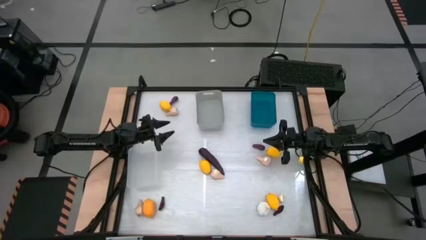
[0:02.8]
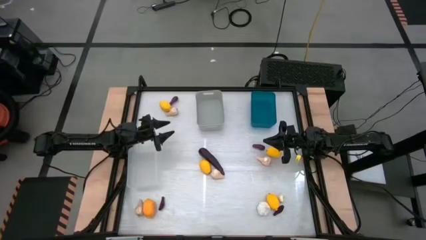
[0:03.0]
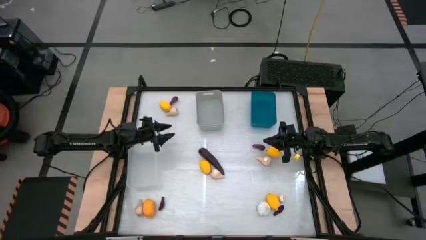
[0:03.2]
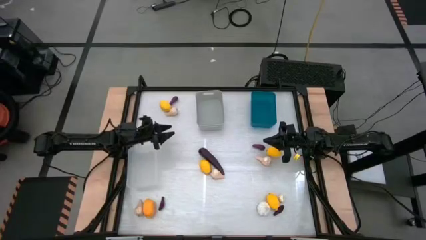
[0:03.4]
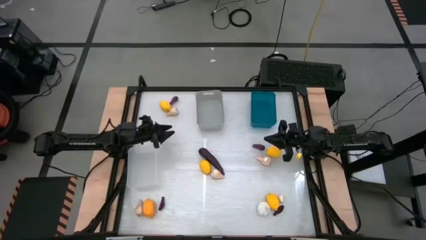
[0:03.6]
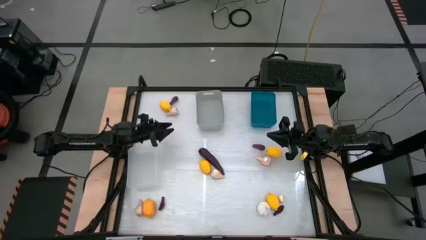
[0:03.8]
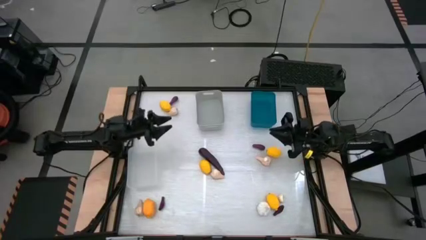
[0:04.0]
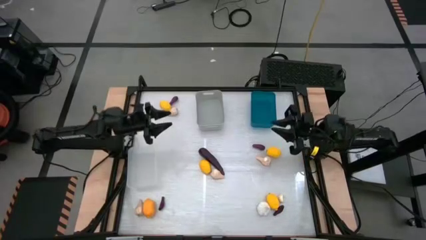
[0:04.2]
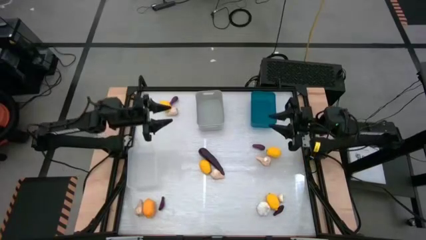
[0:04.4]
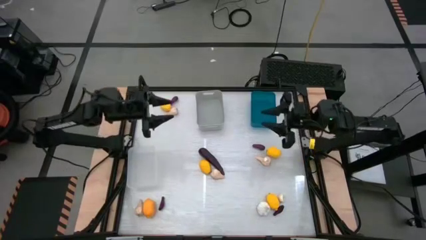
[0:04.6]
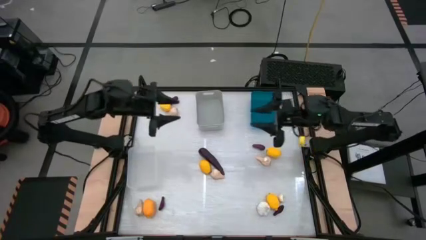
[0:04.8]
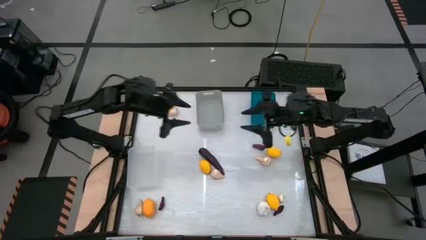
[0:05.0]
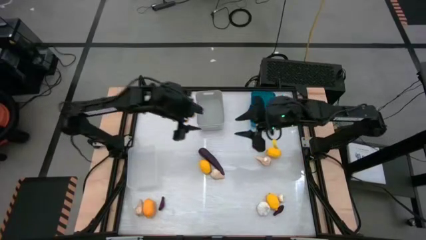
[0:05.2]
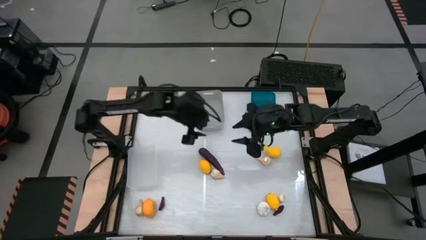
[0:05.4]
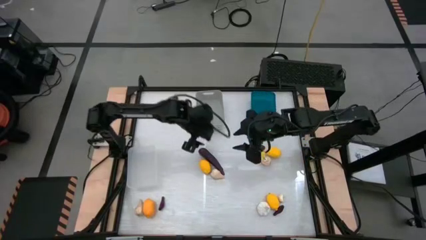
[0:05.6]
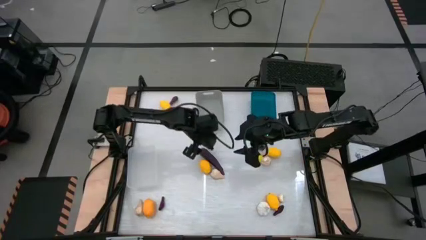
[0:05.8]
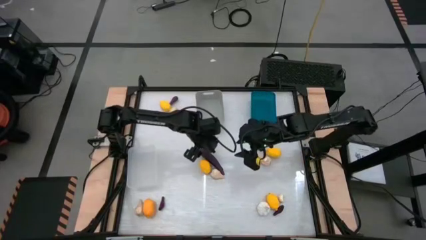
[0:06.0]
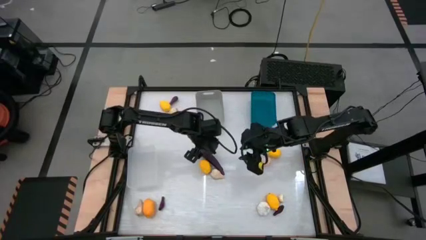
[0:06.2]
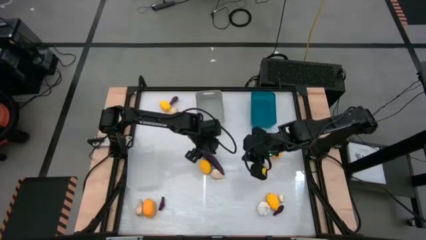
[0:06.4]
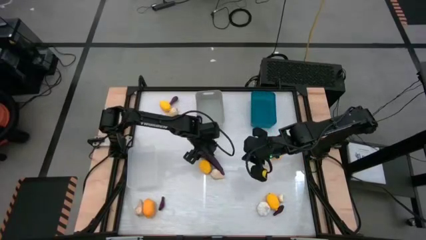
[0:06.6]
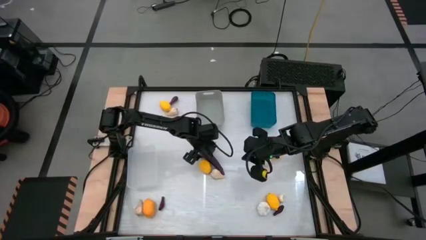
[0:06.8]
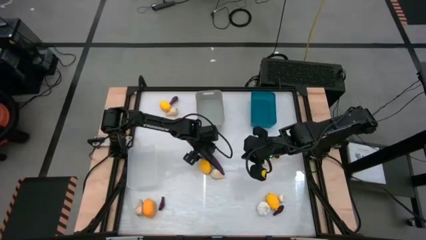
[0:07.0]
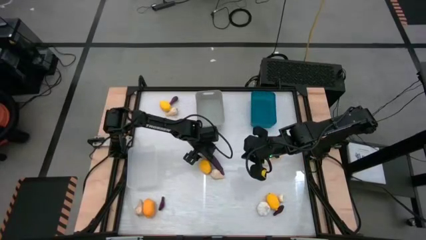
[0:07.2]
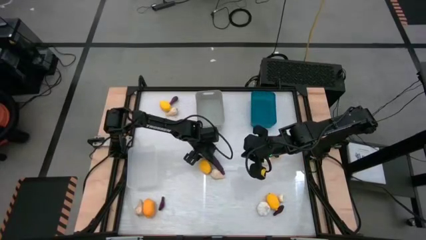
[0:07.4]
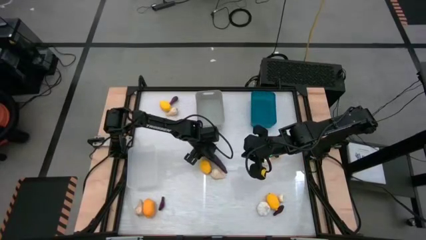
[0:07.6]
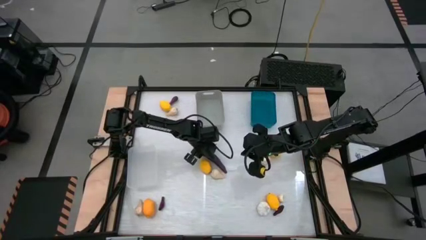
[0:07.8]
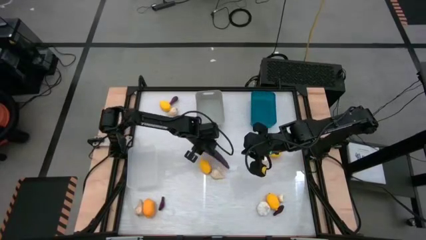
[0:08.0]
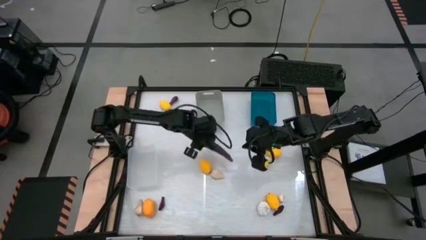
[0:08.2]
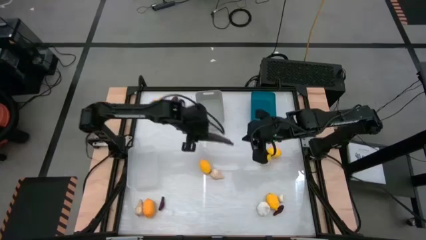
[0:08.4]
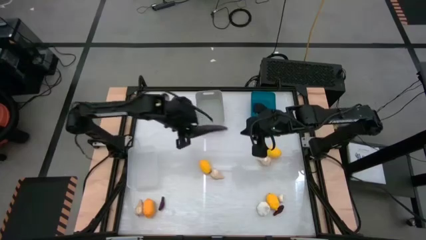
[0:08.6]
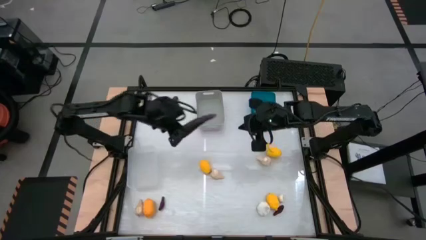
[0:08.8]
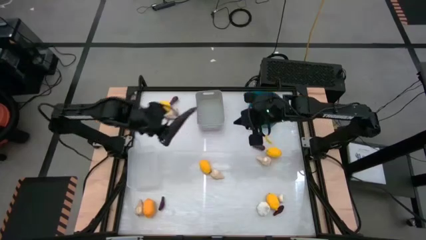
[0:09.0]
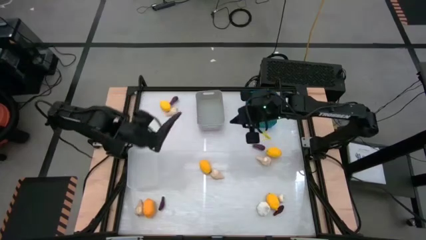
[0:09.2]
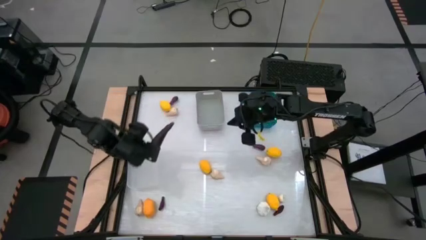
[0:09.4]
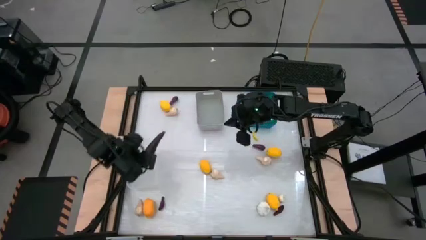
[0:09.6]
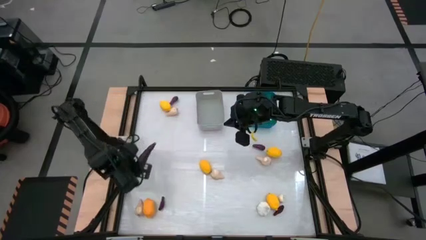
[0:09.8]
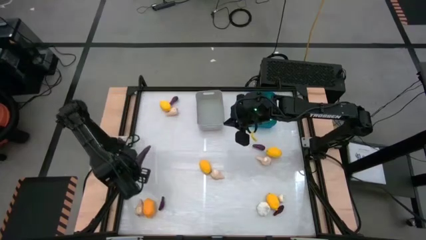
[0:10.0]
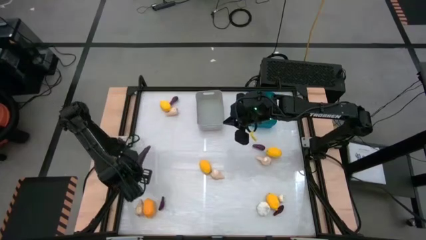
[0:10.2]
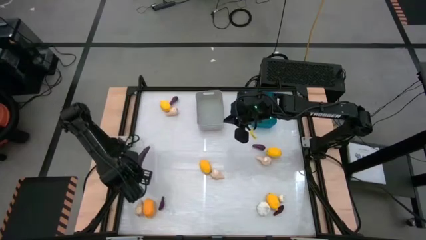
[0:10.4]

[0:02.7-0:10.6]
Task: Sort produce into baskets
Put the purple eggplant into the transparent bin

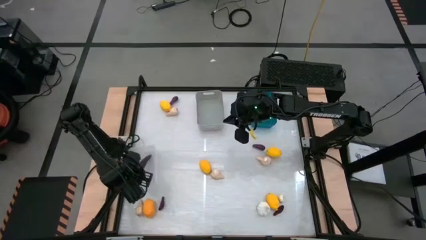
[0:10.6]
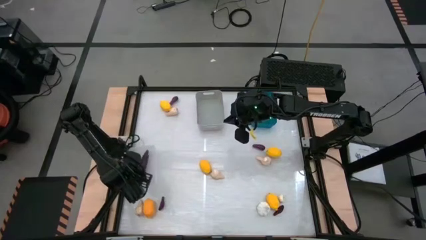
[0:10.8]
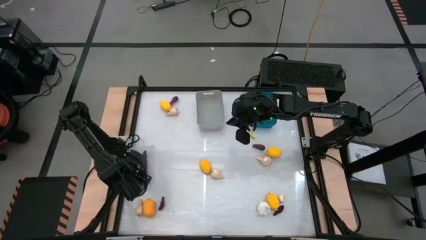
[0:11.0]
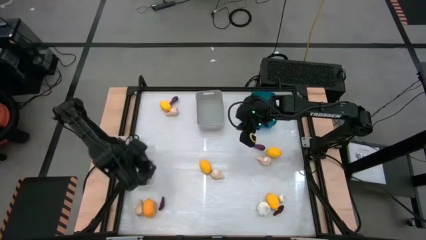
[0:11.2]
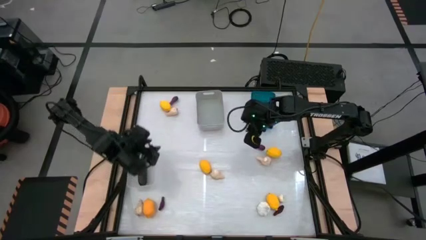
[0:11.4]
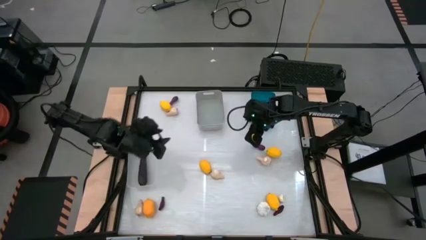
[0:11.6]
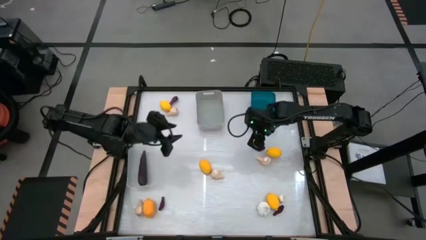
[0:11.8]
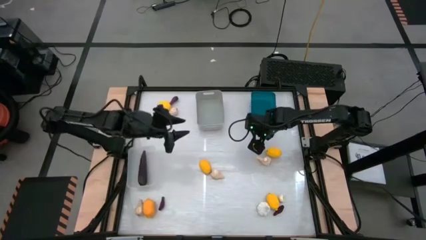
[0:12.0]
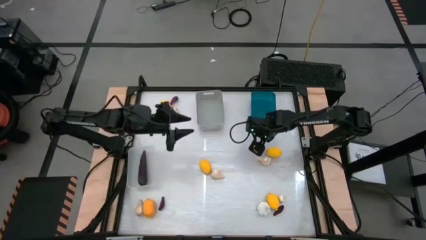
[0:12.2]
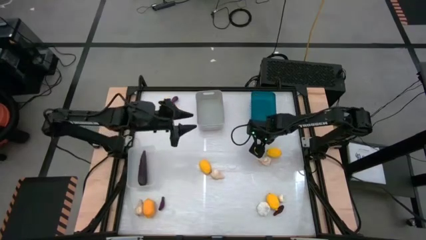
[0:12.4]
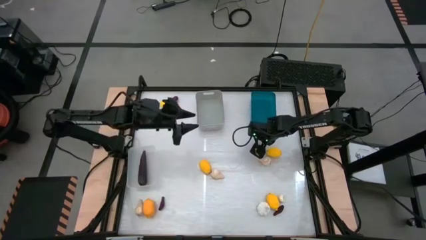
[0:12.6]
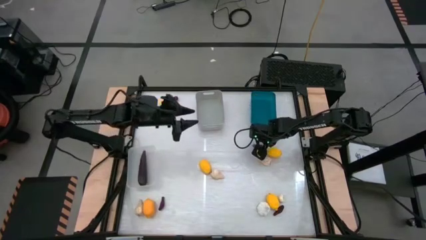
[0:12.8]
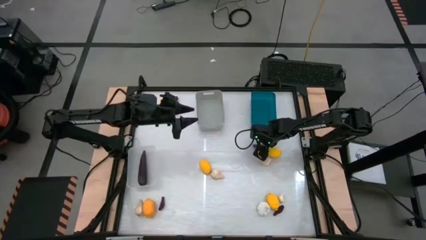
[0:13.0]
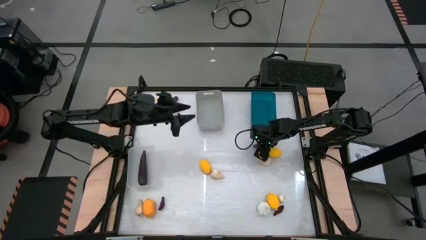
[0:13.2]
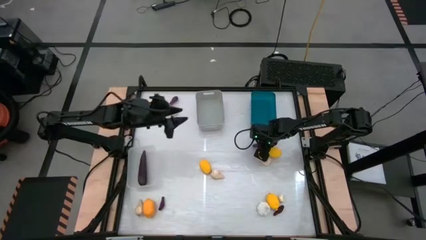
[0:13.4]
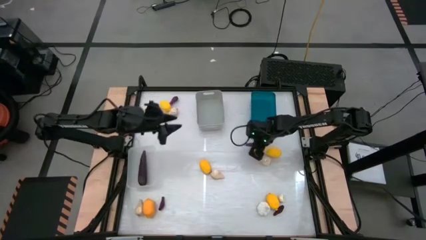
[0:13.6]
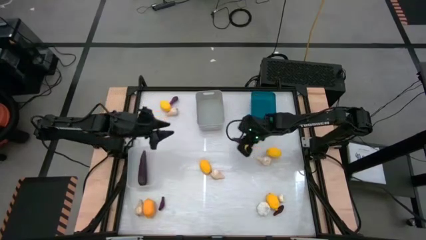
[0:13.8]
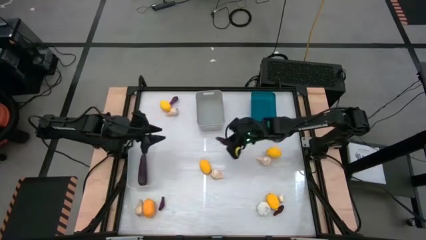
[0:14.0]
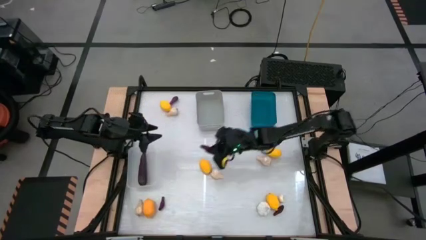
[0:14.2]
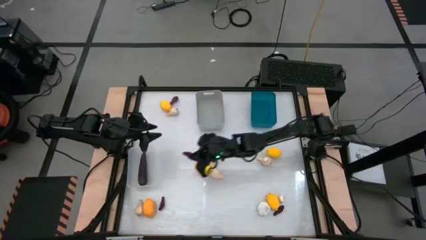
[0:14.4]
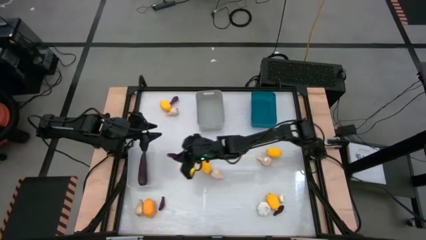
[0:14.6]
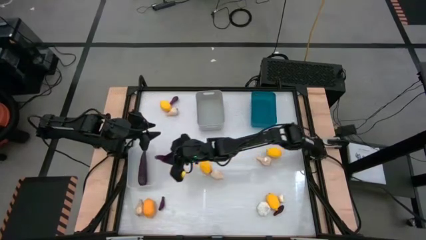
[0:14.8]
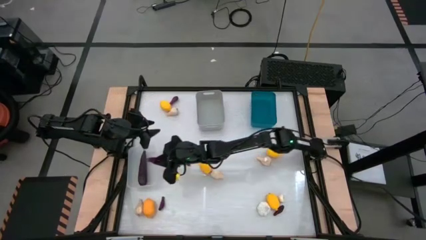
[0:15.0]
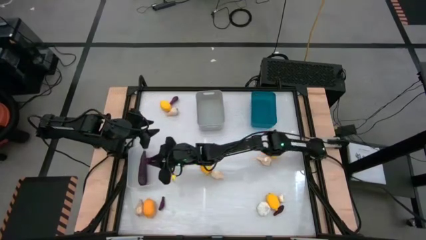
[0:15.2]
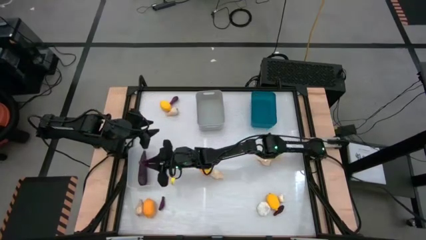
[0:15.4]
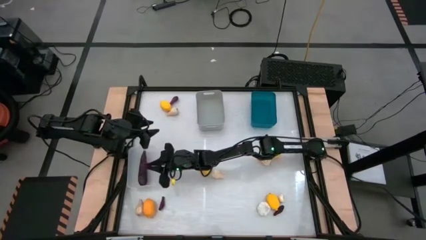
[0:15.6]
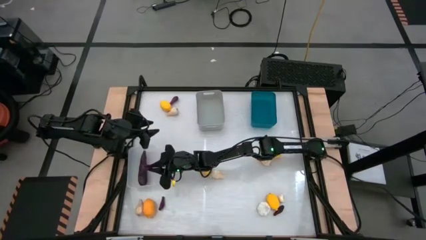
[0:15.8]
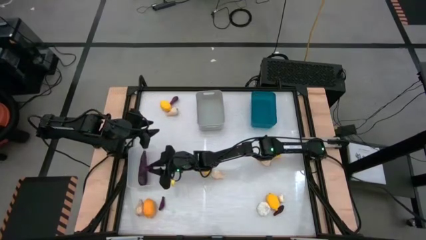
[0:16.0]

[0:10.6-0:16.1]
Put the purple eggplant into the transparent bin

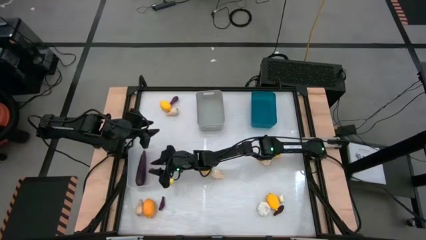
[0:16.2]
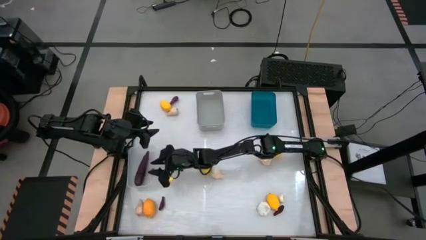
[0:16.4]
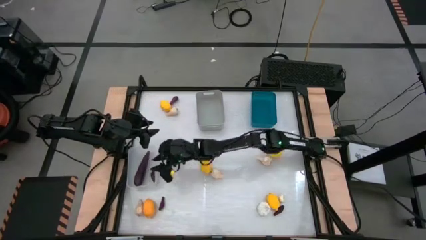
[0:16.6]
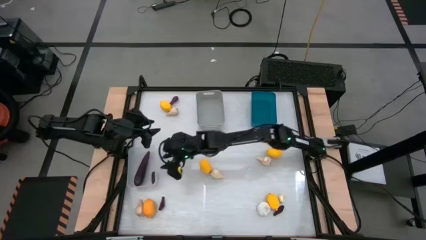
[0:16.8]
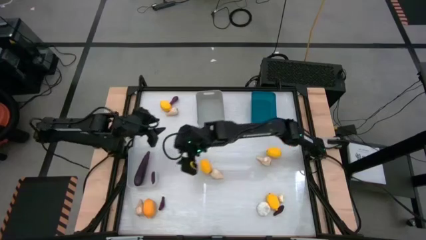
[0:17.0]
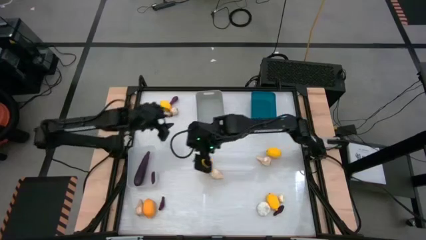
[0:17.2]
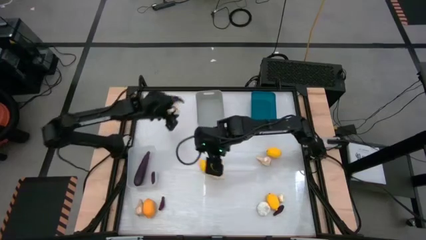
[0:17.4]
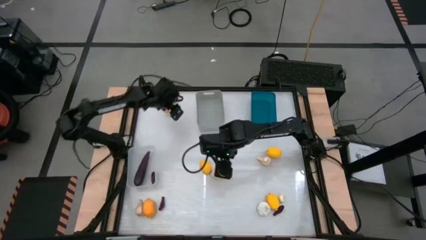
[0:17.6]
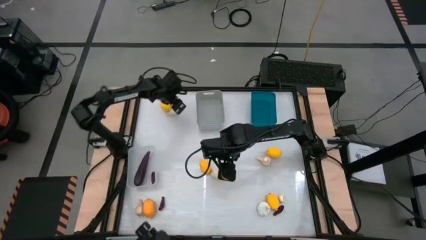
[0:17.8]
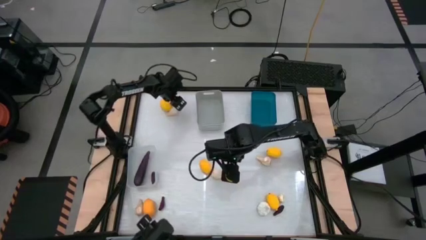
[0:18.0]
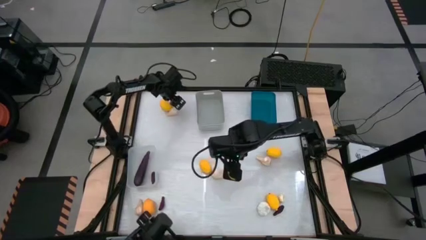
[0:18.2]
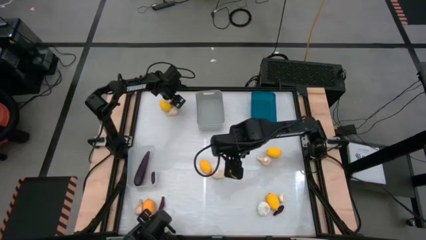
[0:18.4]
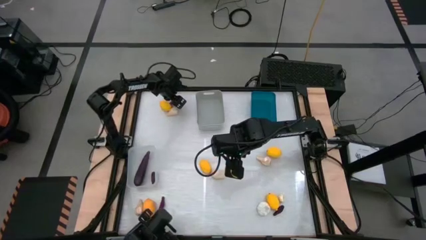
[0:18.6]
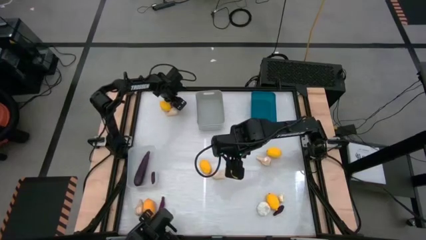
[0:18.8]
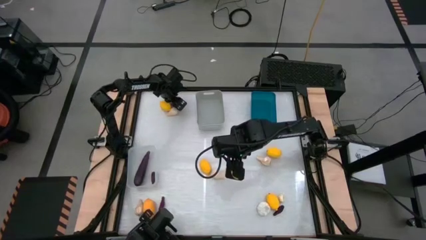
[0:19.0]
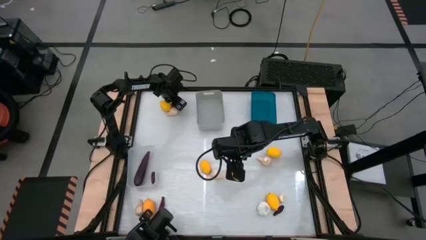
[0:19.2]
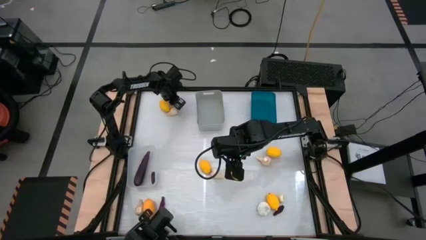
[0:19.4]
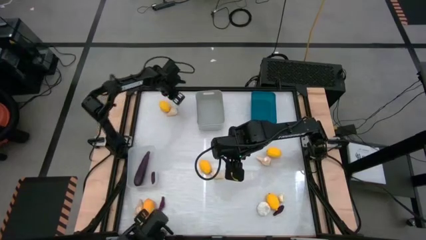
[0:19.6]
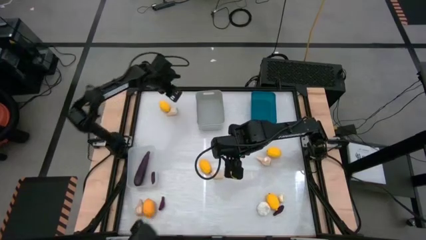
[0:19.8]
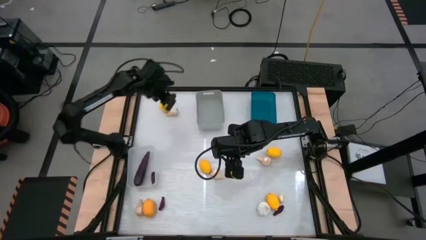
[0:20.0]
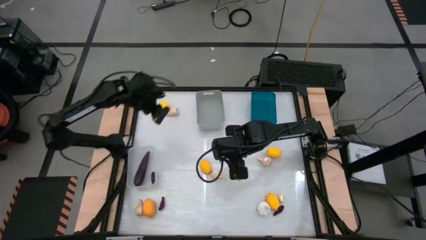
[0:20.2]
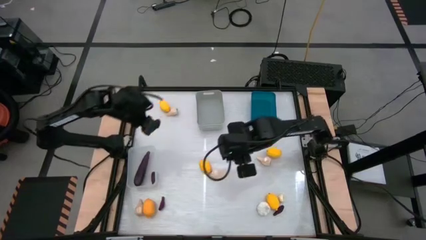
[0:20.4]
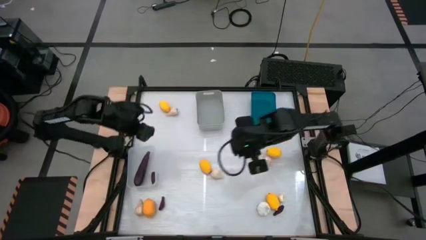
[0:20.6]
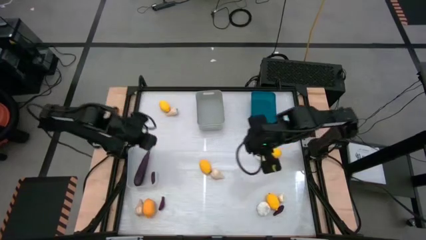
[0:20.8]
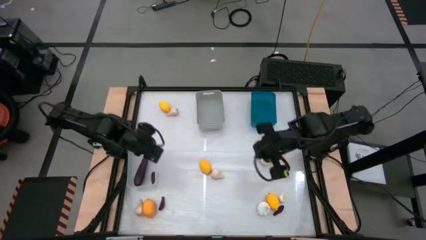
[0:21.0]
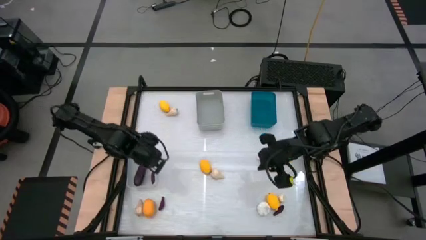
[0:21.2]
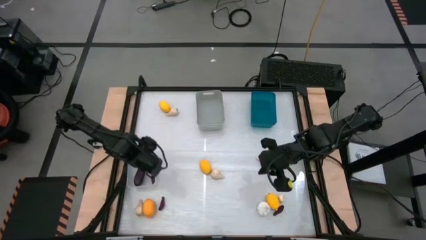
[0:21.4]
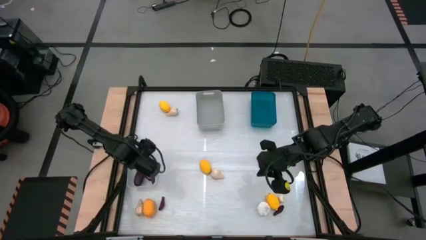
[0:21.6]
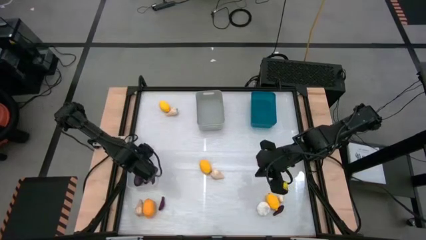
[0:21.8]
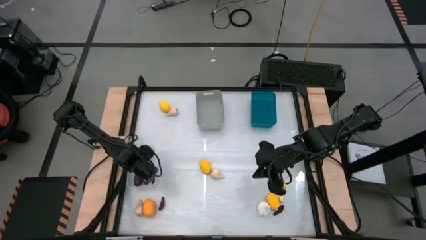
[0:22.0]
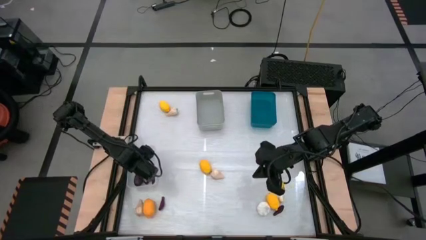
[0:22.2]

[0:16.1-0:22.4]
Put the purple eggplant into the transparent bin
